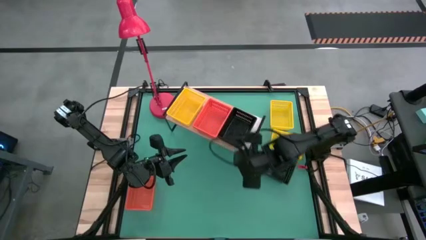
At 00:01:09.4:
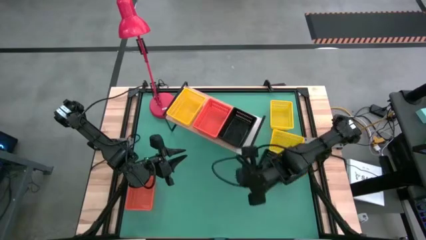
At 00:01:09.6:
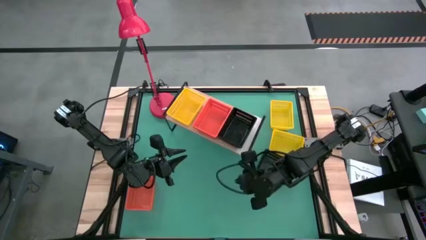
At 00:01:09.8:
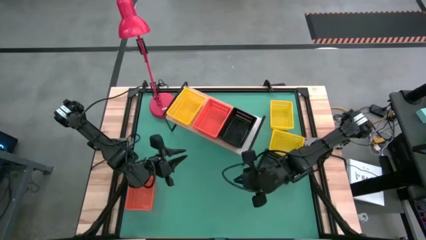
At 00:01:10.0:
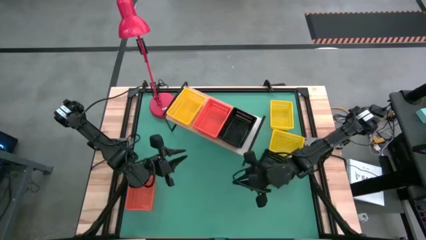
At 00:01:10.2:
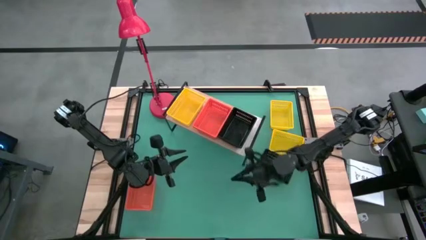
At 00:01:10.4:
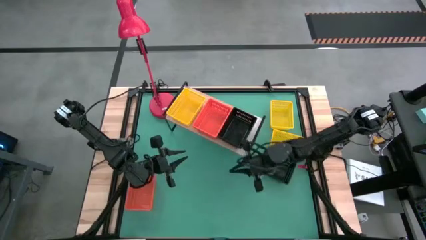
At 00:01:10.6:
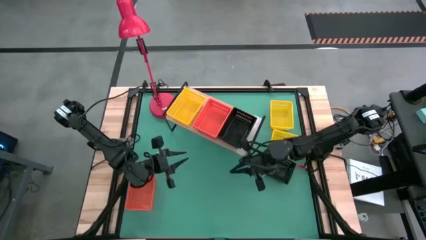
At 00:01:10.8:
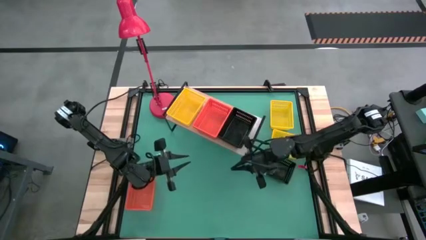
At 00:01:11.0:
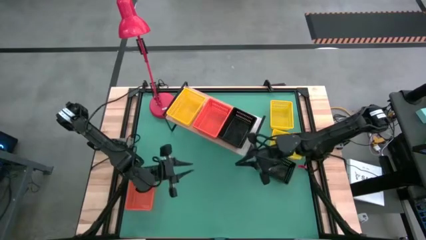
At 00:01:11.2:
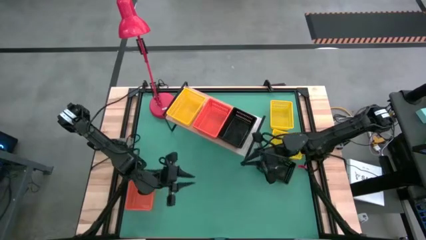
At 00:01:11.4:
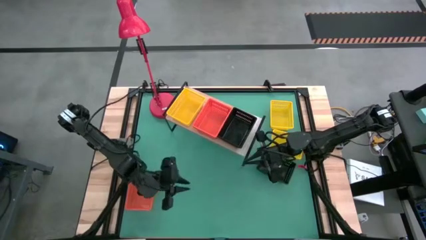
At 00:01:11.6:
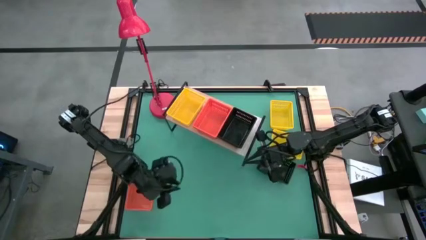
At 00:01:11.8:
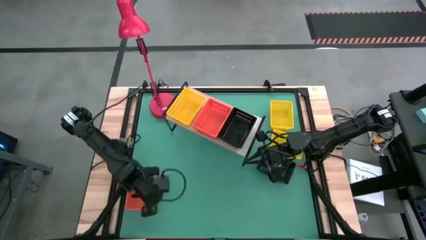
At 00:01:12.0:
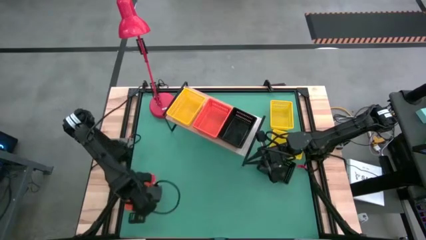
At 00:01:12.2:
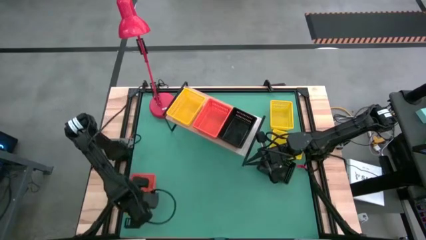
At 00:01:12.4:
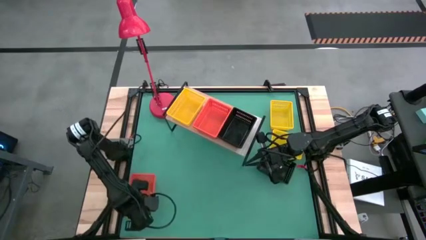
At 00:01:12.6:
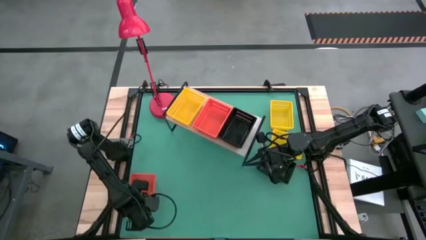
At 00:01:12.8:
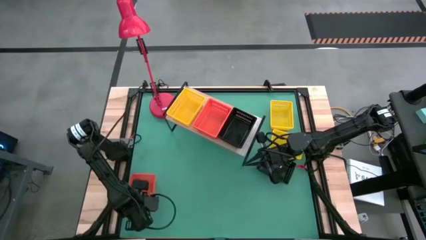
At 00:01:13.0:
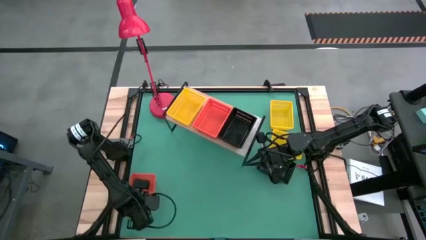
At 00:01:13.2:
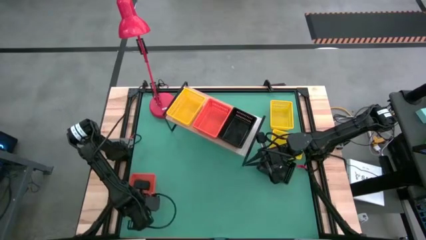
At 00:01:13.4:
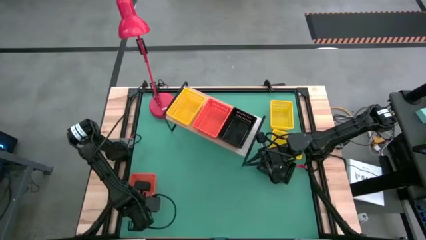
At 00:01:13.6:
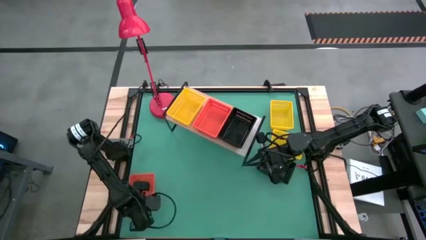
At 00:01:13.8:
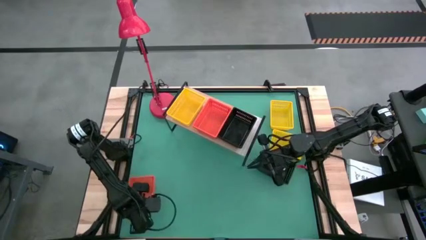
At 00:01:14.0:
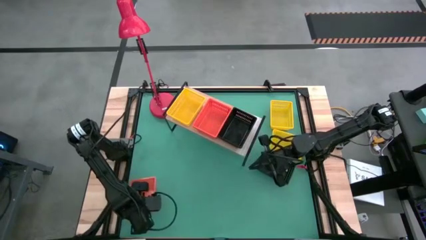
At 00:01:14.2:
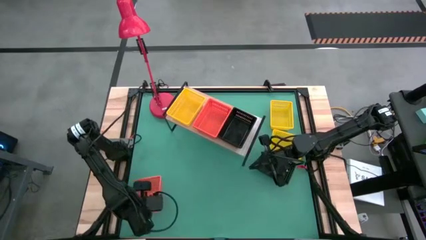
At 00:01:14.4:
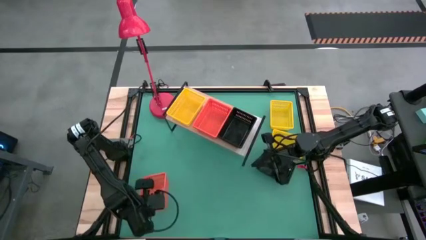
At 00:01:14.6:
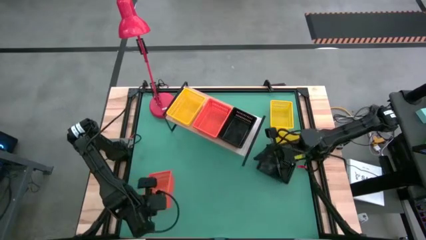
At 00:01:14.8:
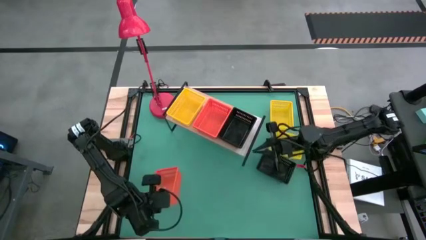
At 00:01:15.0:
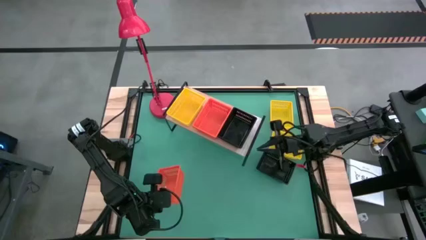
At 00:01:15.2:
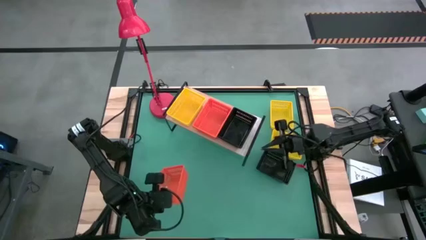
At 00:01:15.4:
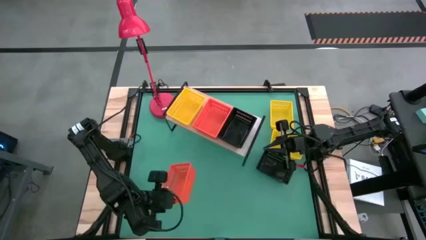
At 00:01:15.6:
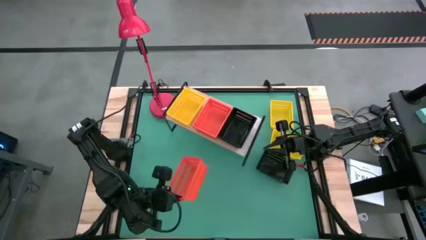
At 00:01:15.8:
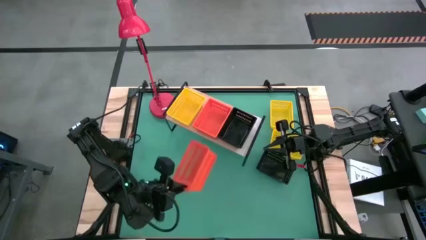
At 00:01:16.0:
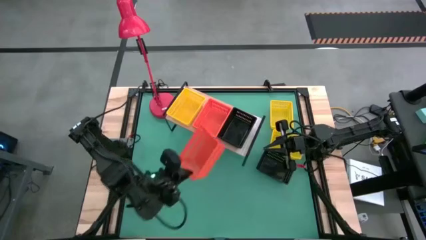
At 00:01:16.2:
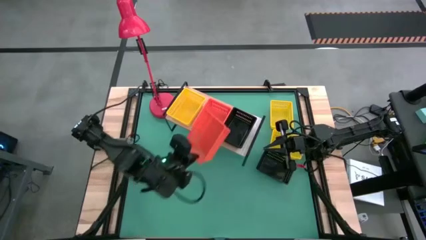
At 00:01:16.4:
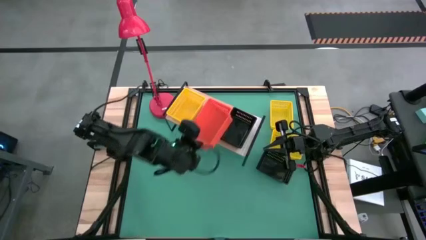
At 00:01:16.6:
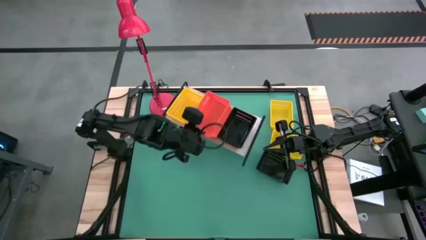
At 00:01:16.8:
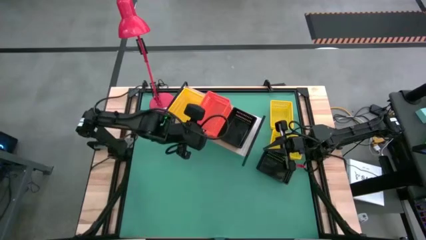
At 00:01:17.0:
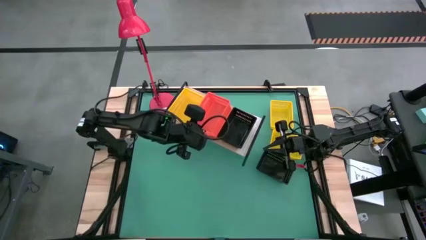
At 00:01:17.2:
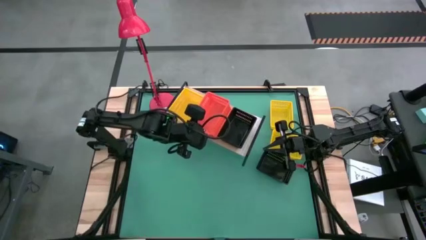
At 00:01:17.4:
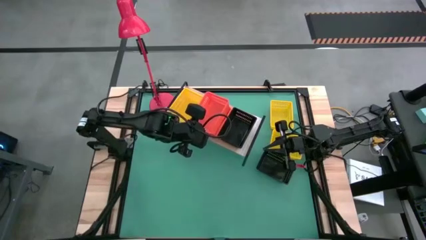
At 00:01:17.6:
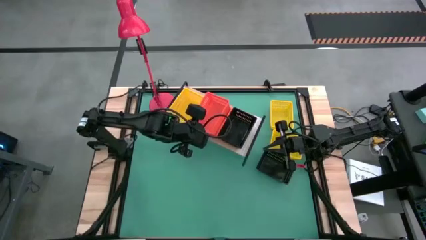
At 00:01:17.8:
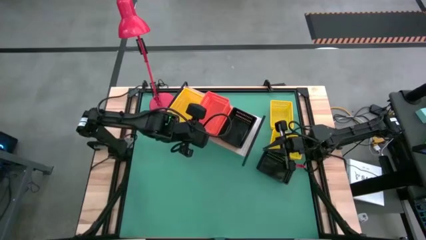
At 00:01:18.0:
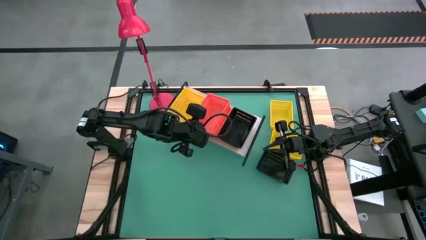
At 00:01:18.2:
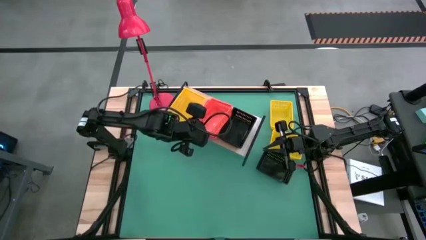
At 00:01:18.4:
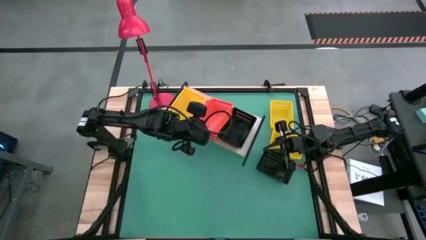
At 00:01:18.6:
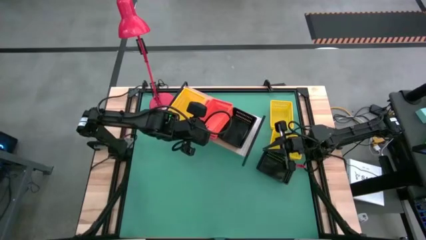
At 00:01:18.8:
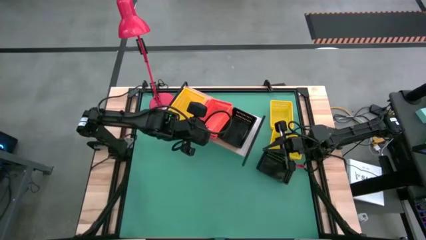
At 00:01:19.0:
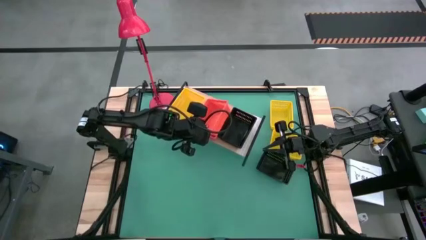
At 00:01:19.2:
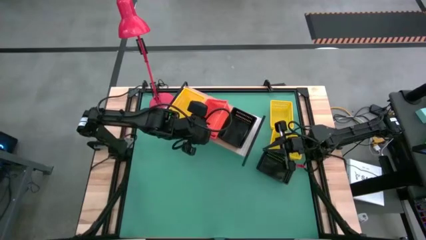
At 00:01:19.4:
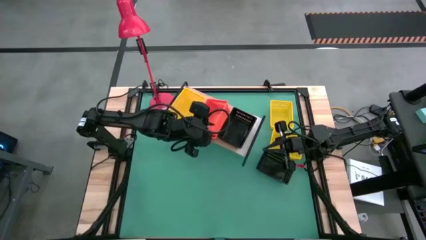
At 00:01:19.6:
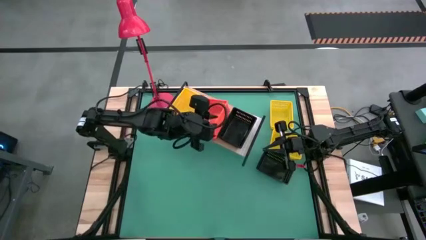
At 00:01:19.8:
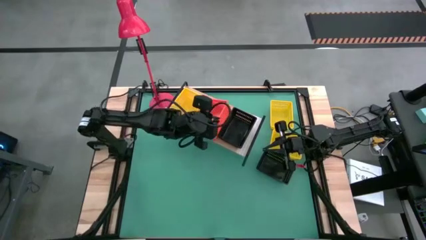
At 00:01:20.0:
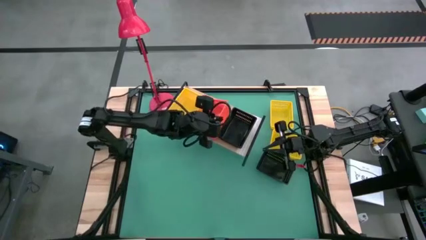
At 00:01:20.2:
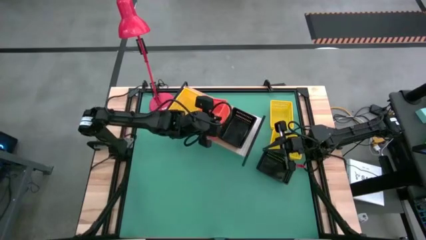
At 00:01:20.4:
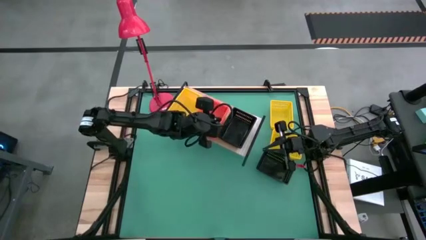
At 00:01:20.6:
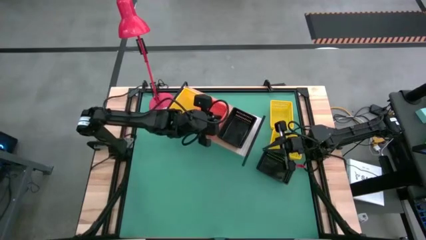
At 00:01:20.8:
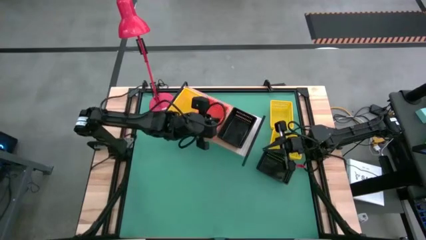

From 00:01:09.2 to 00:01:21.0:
Task: Stack baskets on shelf by color
Stack the orange bin on top of the other orange bins on the shelf

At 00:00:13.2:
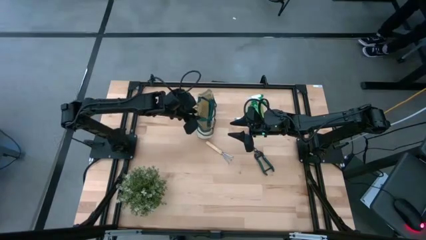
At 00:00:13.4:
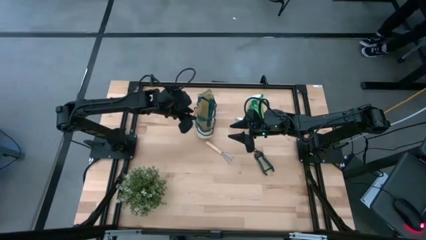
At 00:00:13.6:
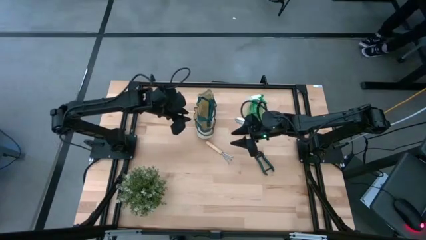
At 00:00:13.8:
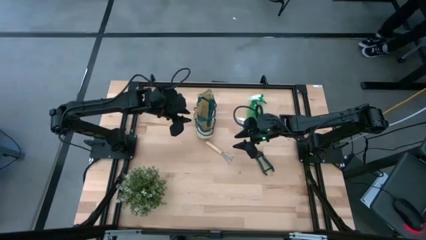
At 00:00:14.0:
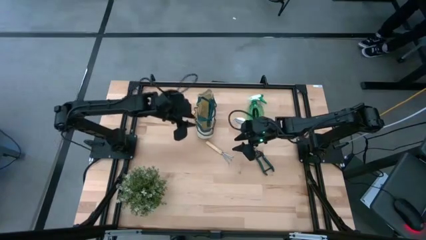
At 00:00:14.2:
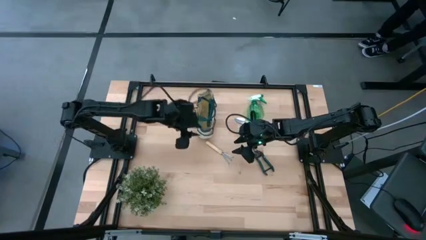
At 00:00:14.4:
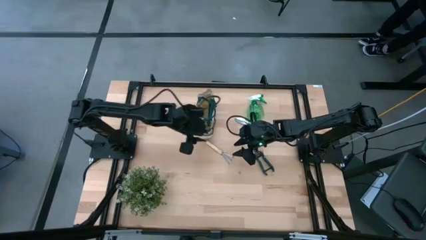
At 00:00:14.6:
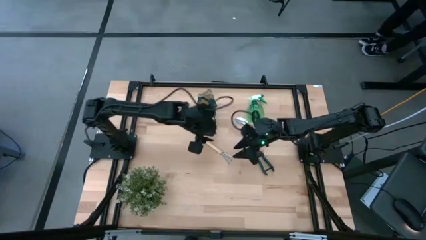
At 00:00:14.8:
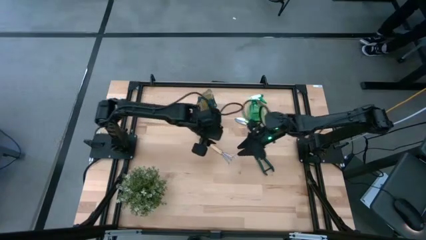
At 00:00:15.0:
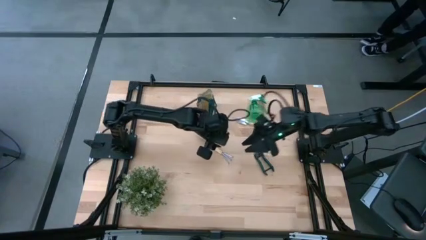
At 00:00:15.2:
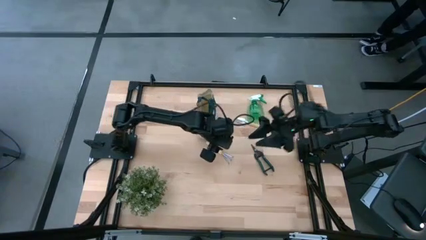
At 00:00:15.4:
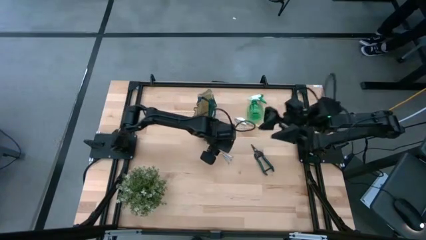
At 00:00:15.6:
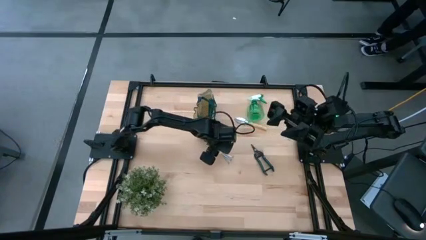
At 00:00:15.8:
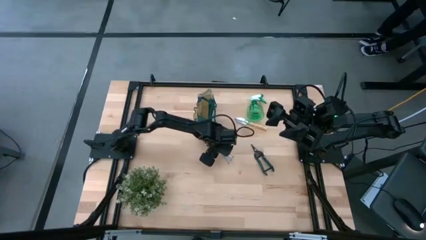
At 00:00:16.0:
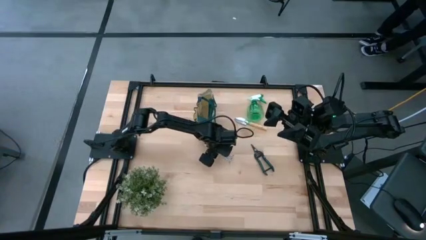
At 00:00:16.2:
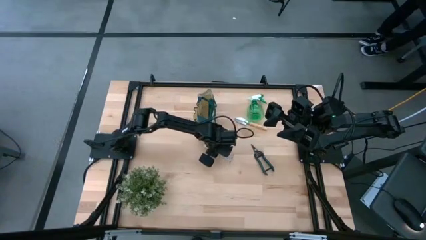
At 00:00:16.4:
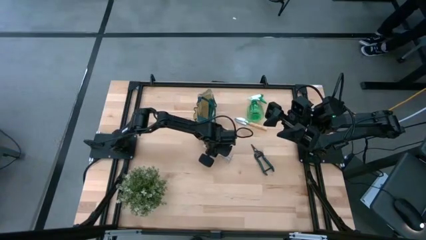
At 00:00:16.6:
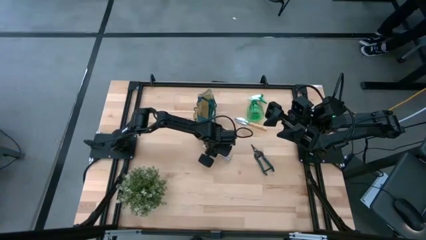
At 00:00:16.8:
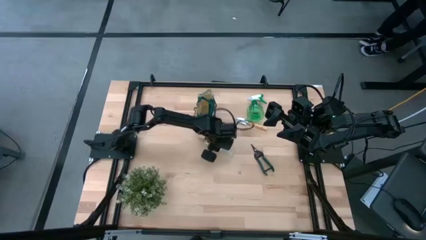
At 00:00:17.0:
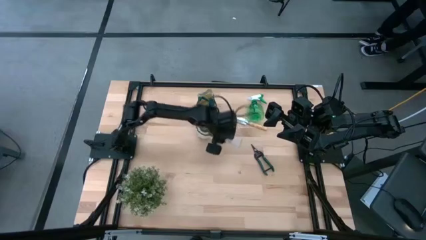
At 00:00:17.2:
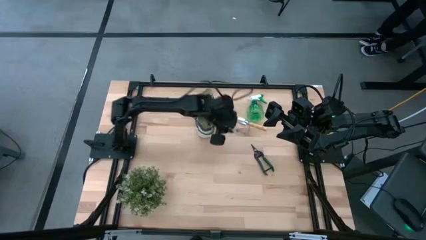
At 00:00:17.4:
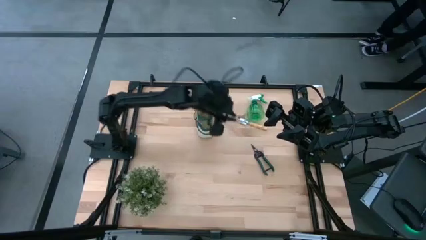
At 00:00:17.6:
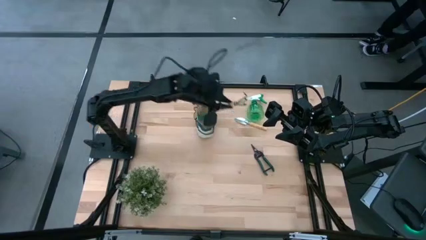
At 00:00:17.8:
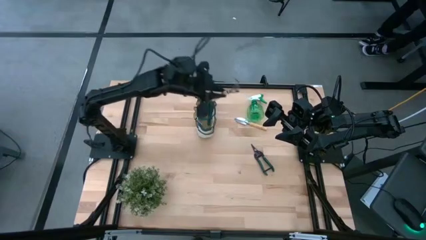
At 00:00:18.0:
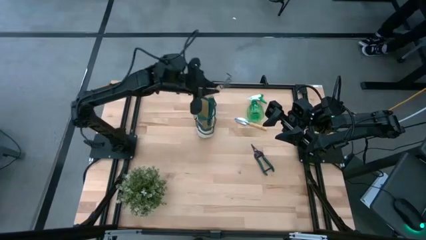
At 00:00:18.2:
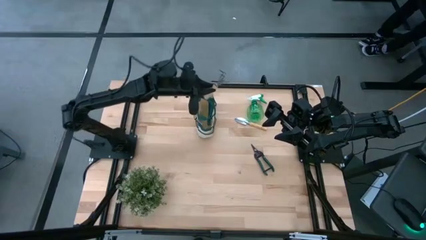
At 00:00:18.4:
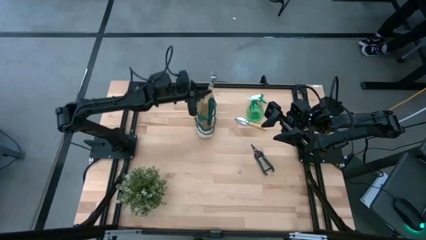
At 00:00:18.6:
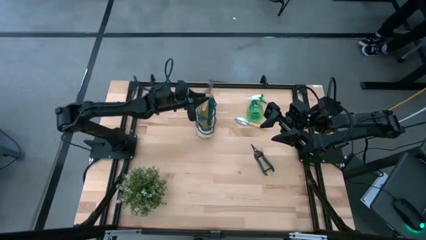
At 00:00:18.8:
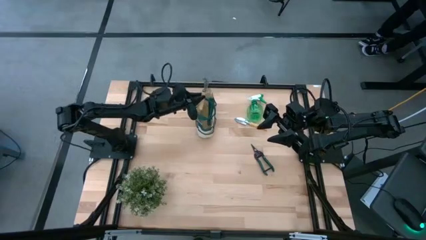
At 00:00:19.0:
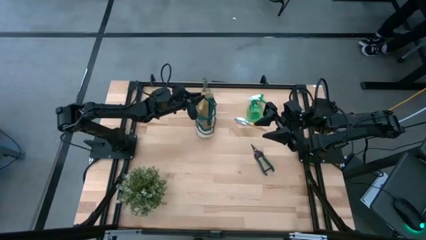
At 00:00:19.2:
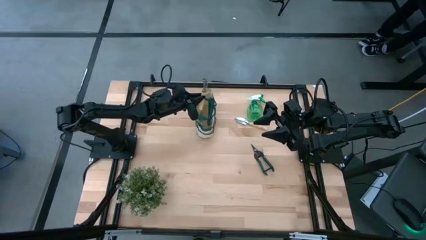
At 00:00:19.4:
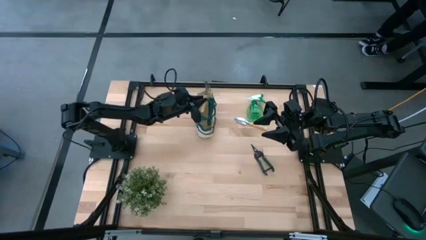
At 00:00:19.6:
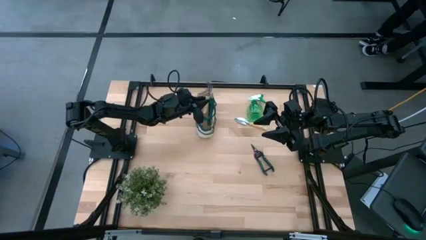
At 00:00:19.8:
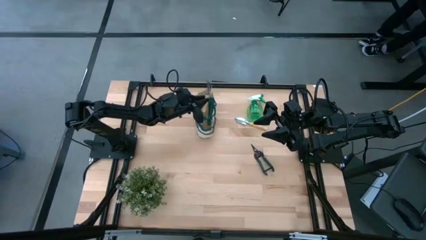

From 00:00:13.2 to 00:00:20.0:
Task: Pick & Place Garden tools in Gardening bag
Put the hand rake into the gardening bag
